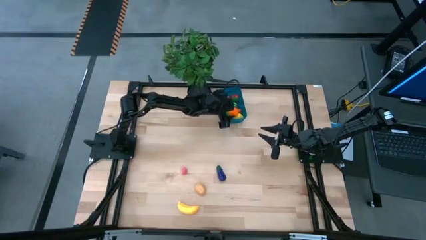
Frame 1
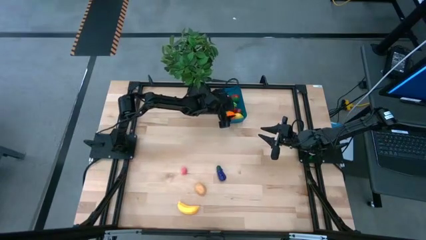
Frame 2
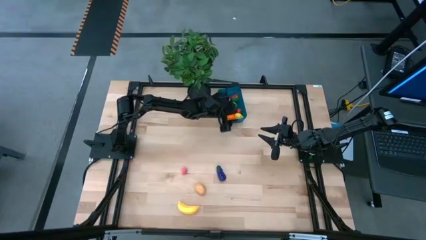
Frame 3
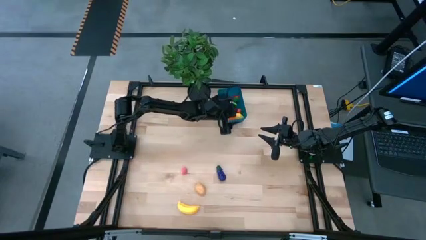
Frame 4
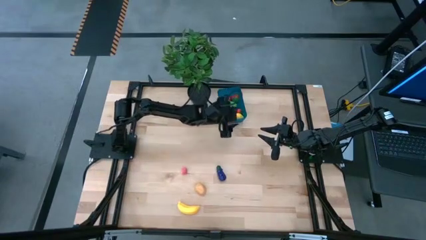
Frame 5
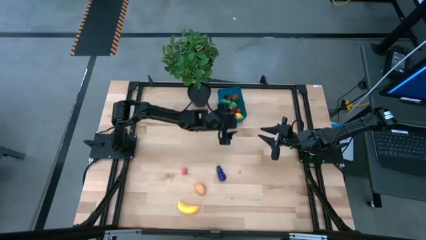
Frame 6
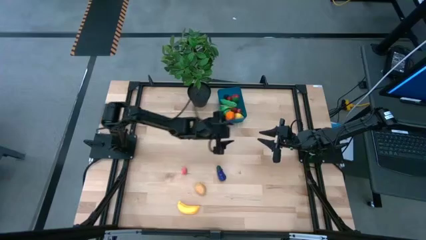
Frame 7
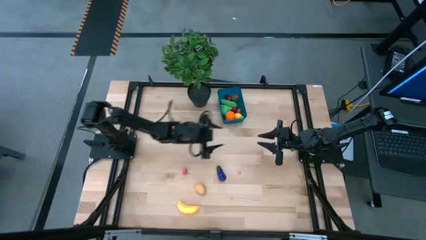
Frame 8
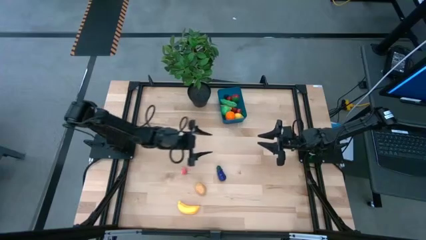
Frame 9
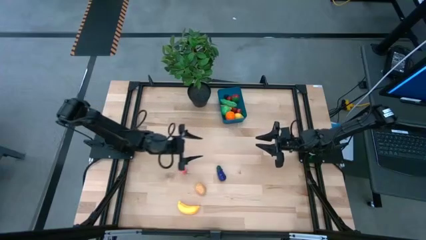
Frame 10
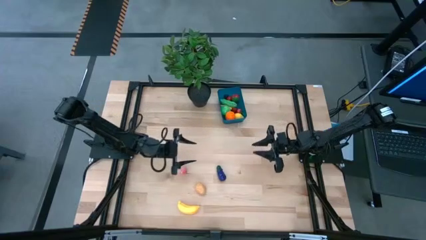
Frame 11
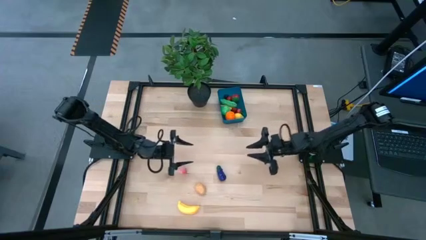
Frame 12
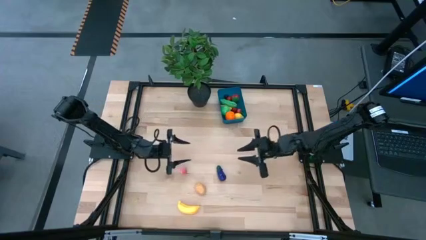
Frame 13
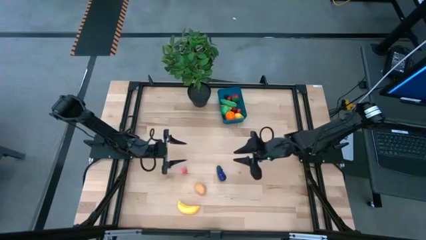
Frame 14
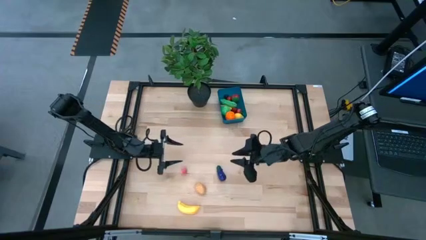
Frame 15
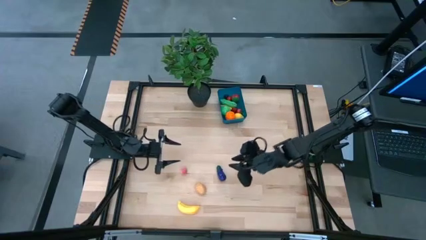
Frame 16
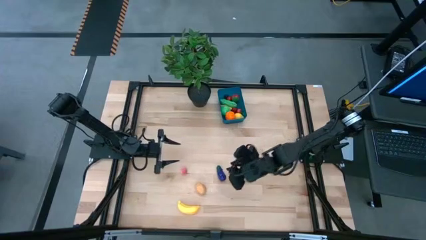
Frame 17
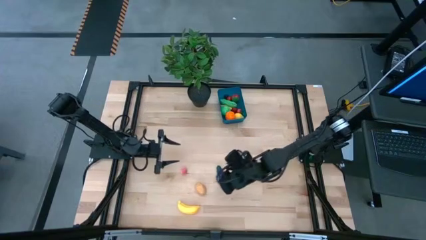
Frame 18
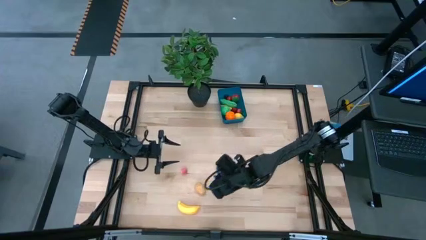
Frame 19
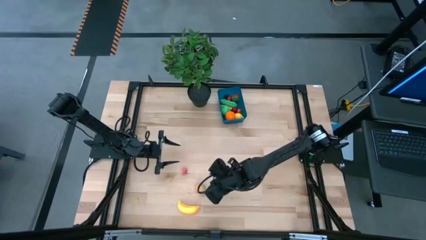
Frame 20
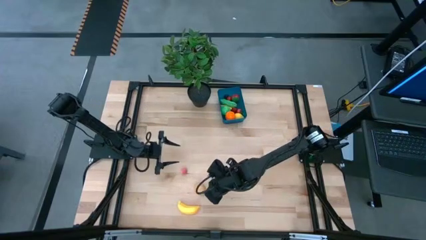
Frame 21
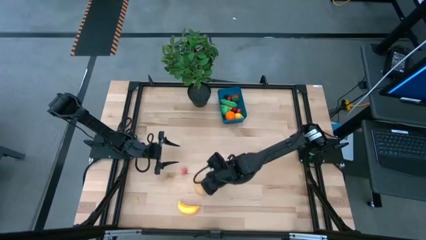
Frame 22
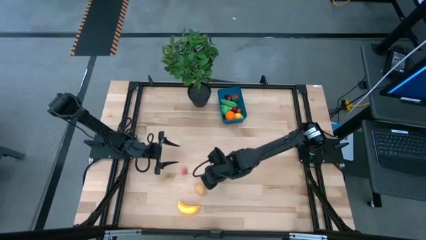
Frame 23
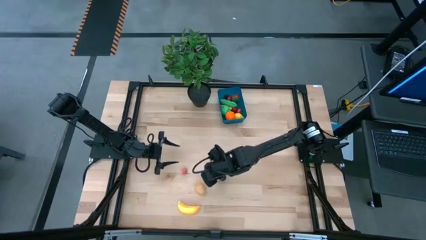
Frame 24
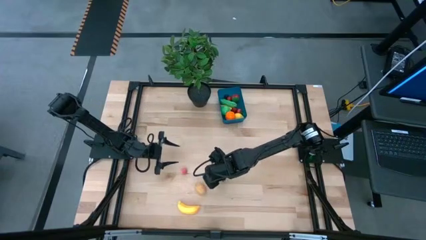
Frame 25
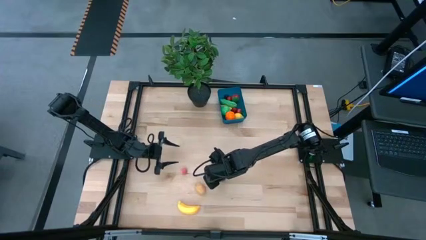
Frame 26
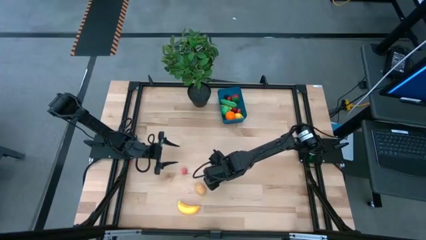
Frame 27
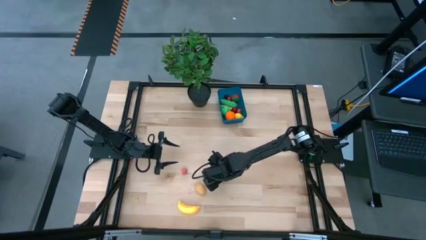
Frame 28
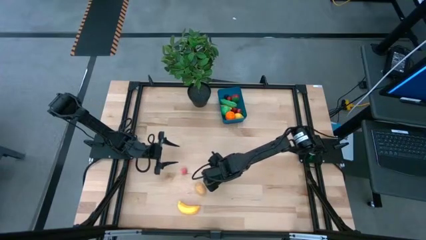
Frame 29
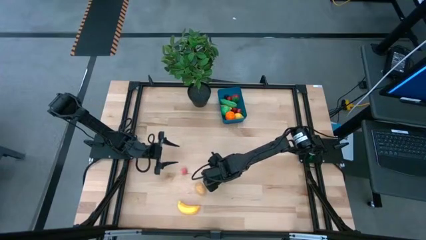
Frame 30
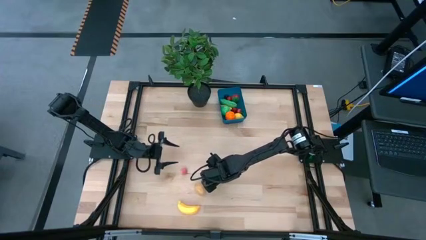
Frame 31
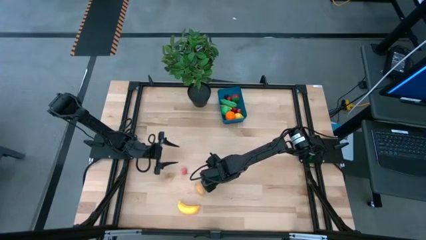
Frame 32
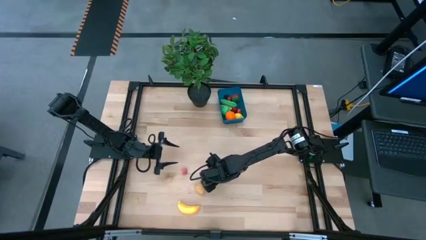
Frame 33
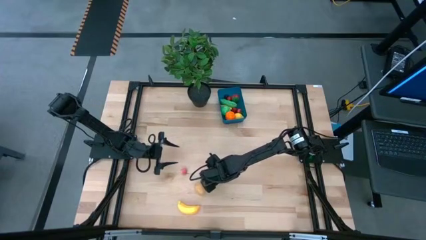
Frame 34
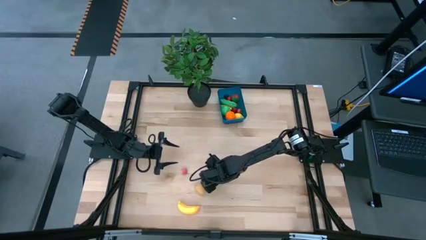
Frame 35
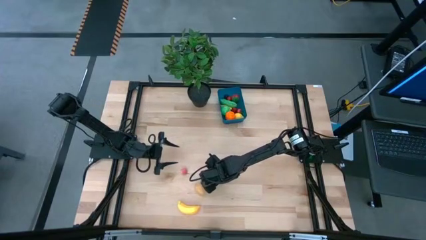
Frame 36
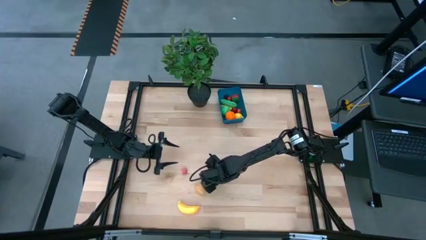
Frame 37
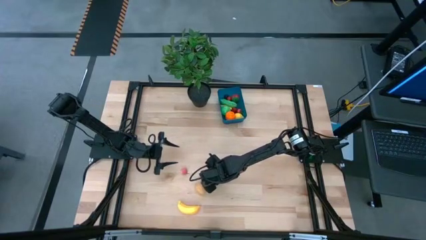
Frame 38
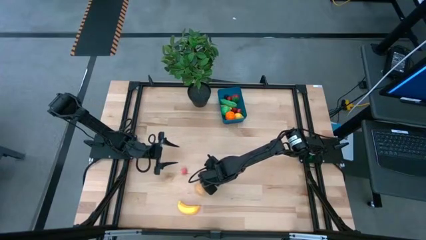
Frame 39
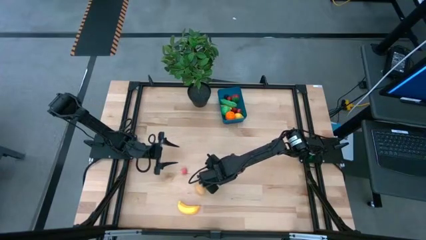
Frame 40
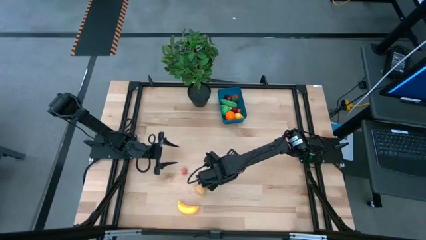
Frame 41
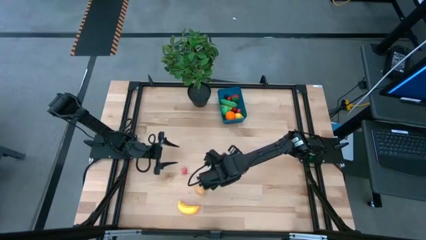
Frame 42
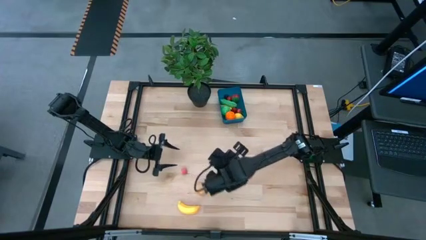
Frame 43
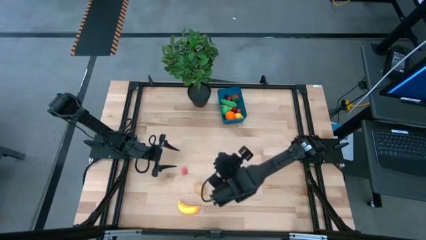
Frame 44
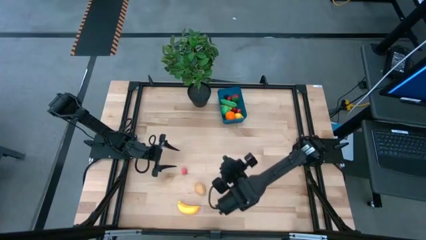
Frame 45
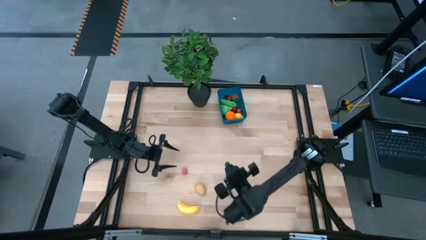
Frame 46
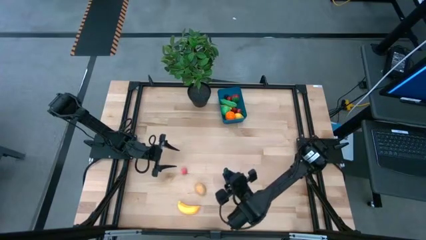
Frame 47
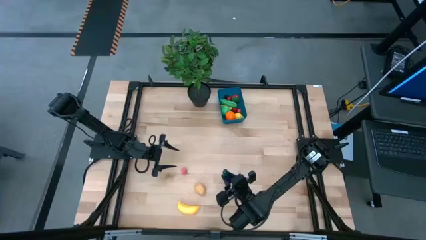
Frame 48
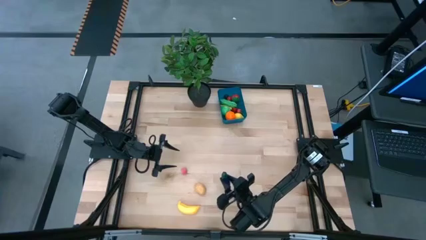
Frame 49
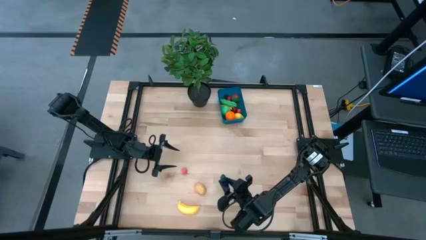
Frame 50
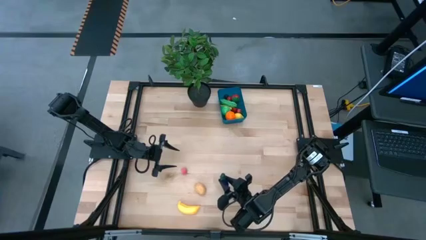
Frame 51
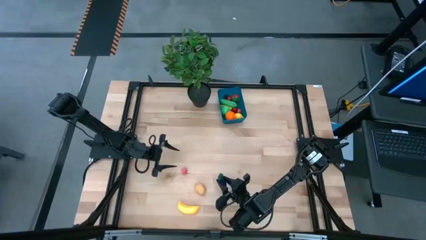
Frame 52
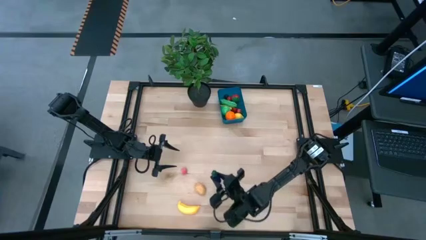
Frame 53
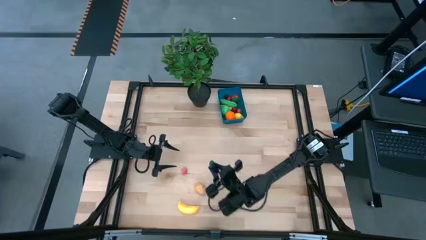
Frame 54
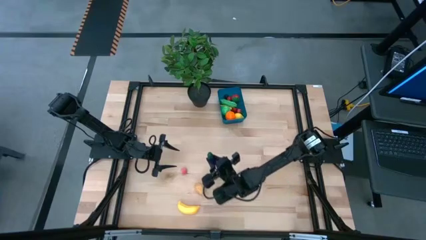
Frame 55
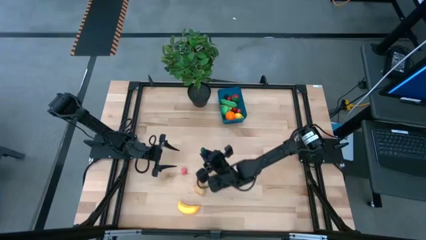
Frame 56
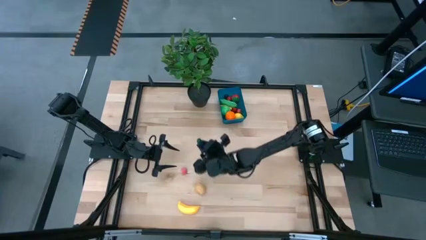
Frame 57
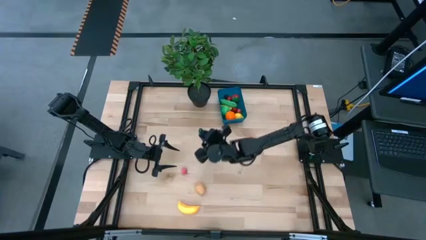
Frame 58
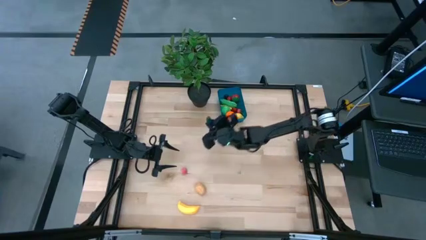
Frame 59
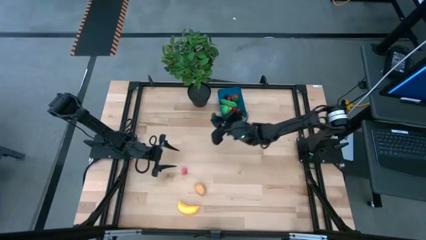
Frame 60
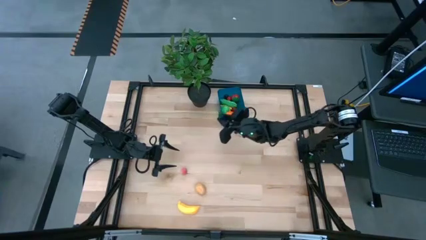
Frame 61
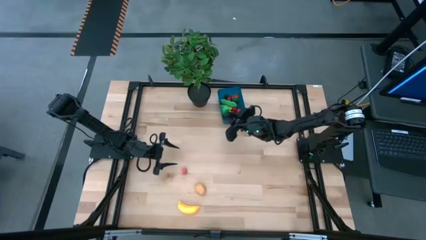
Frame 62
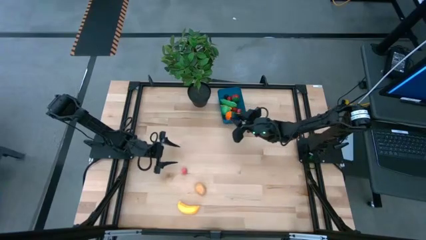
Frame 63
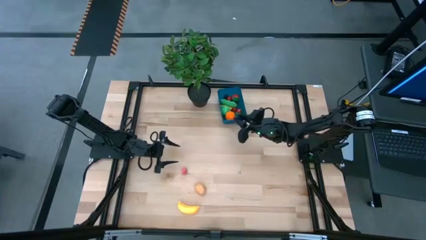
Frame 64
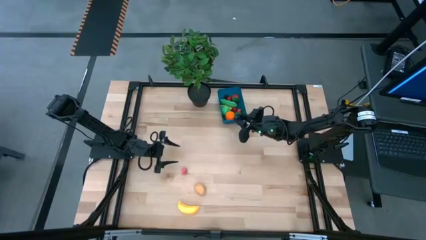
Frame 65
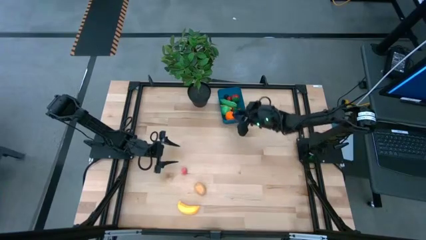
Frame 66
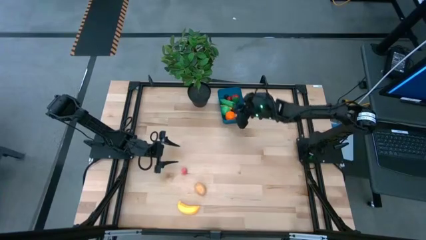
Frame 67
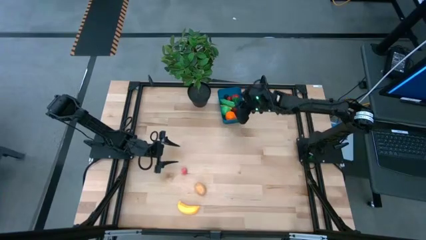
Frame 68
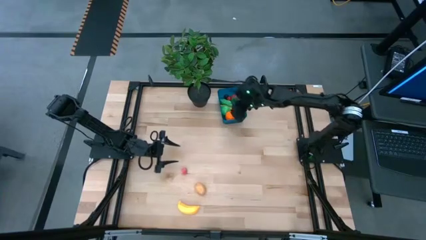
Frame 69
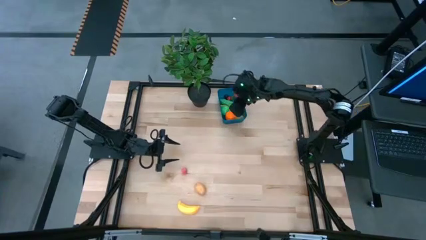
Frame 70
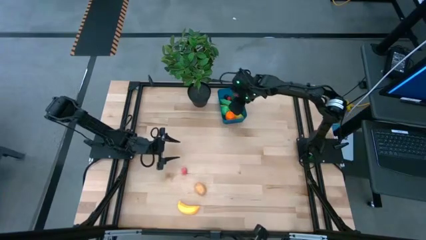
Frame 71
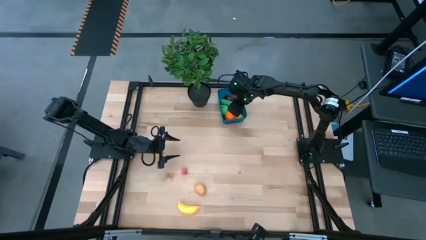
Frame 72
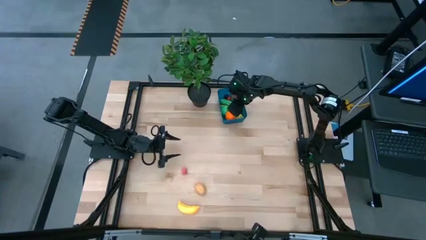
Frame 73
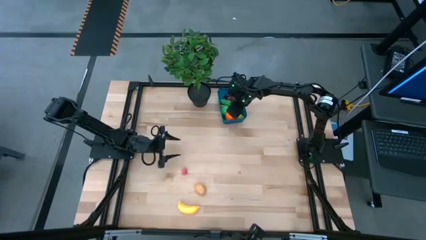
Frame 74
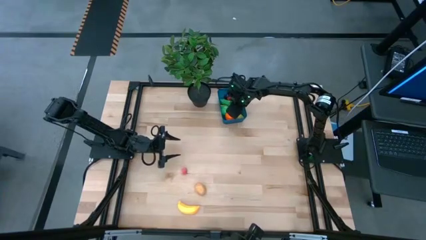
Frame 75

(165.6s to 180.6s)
Task: Pick and placing Produce into tupperware
Put the eggplant into the blue bin
